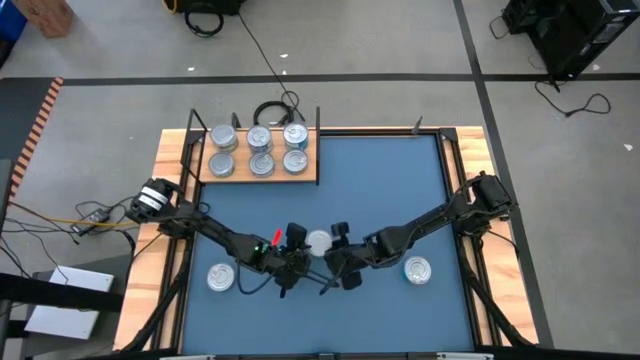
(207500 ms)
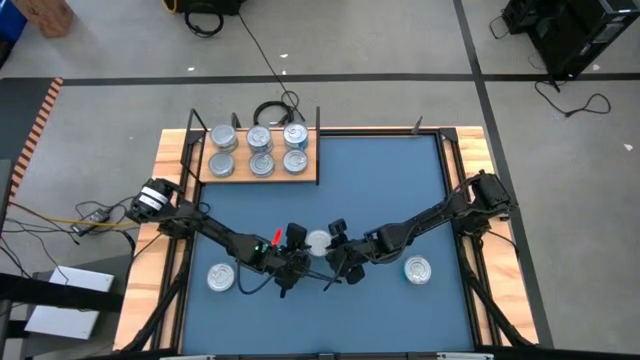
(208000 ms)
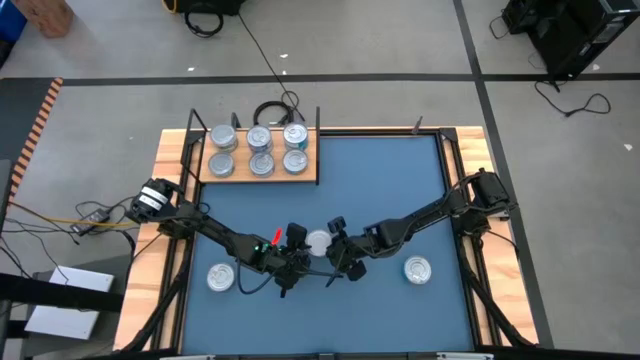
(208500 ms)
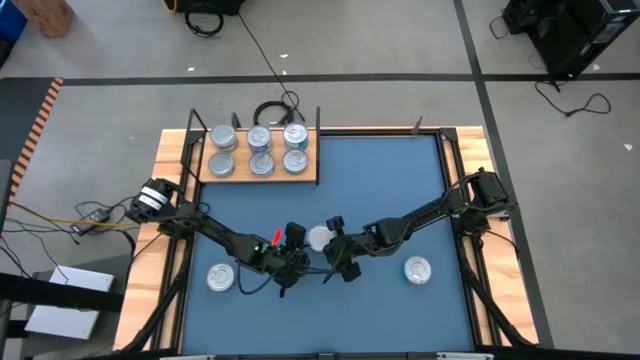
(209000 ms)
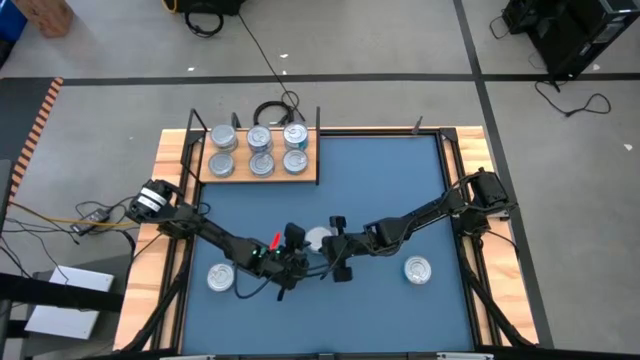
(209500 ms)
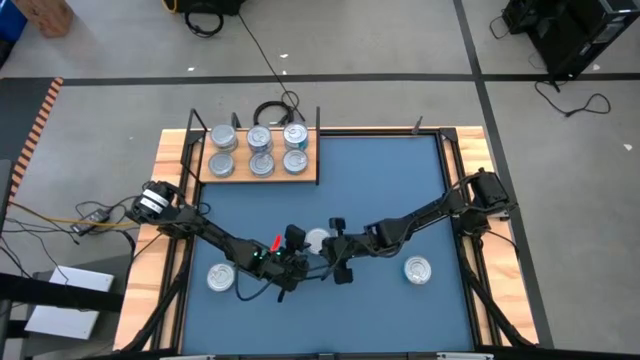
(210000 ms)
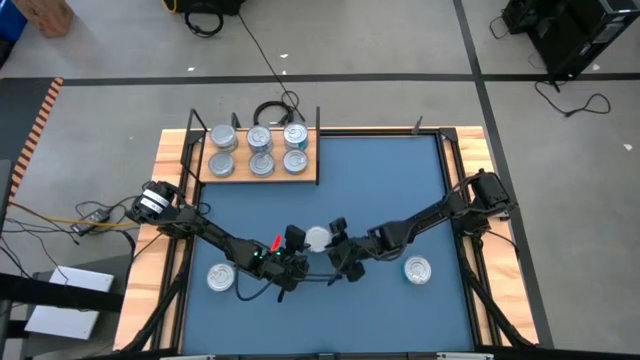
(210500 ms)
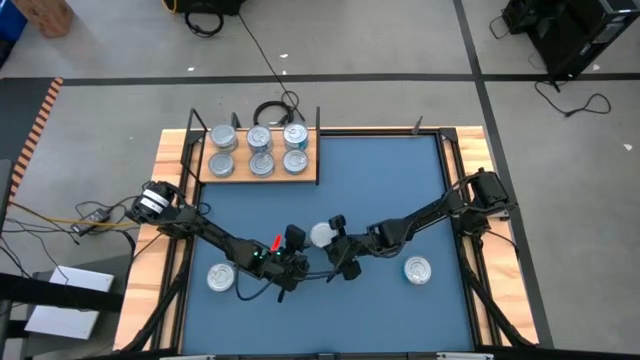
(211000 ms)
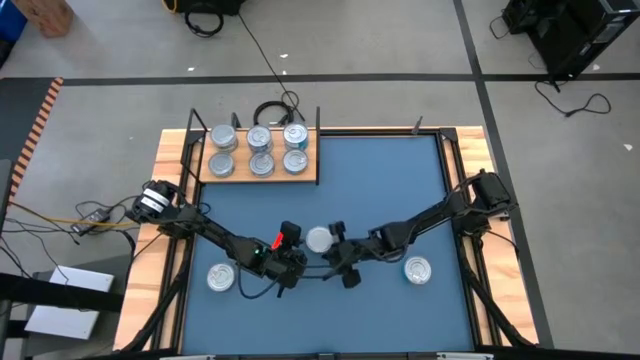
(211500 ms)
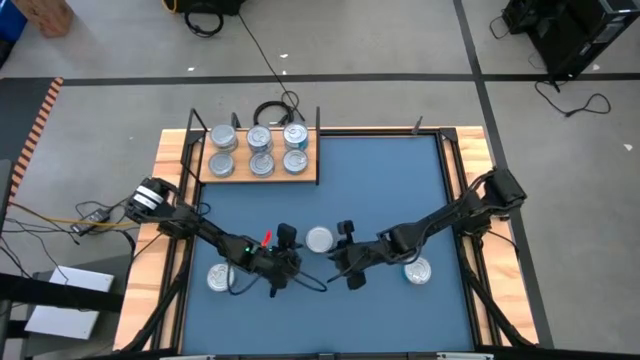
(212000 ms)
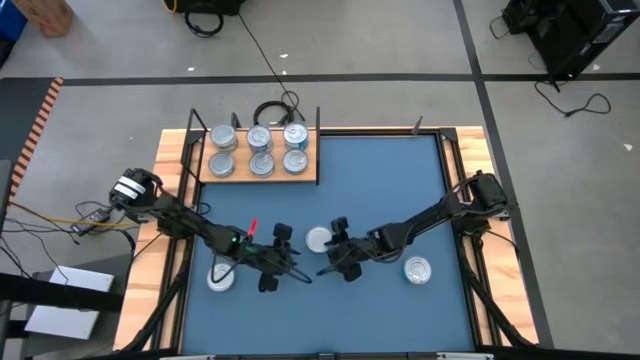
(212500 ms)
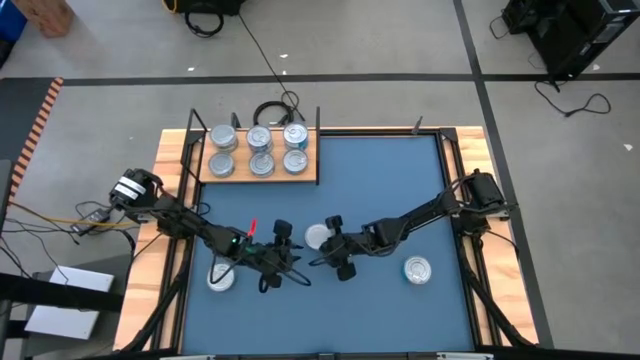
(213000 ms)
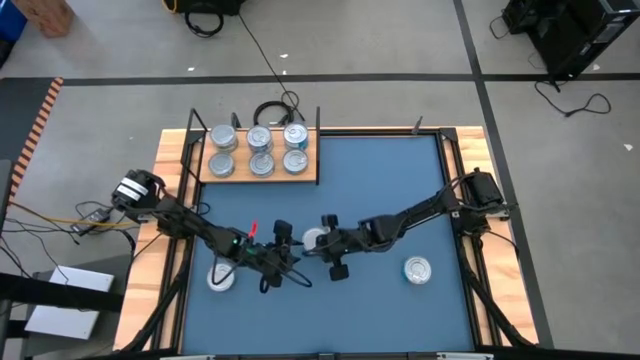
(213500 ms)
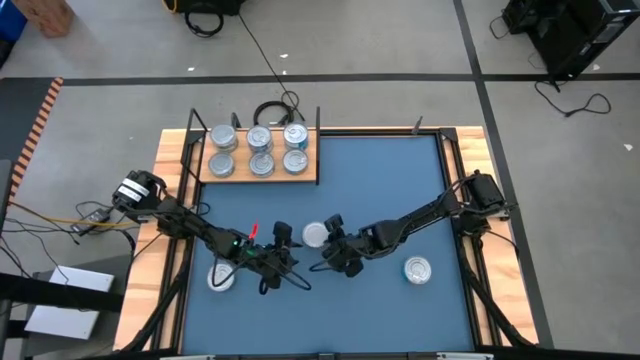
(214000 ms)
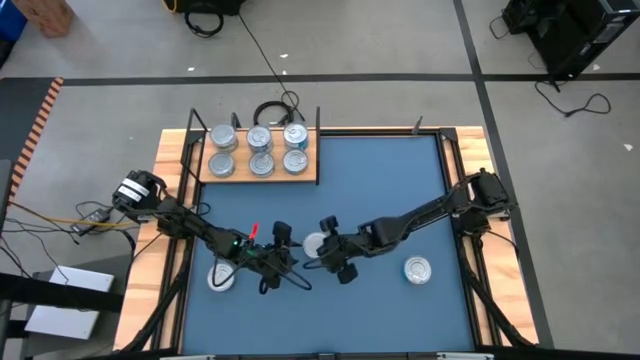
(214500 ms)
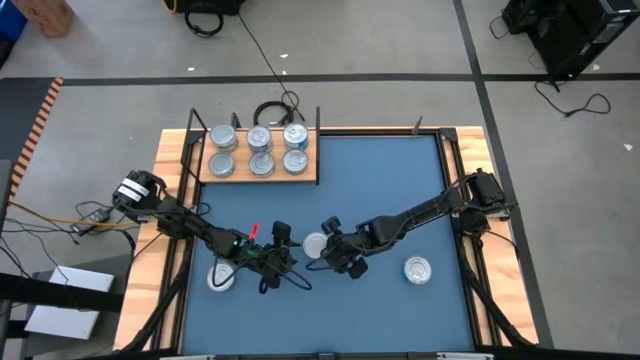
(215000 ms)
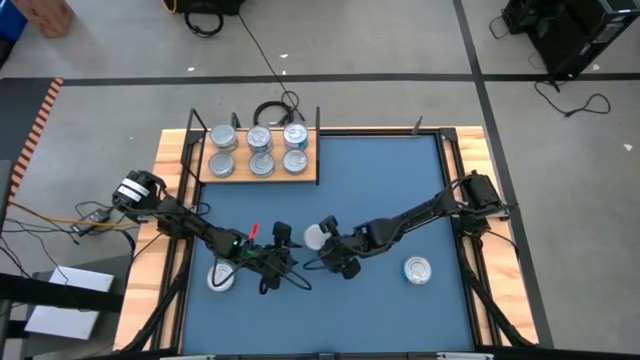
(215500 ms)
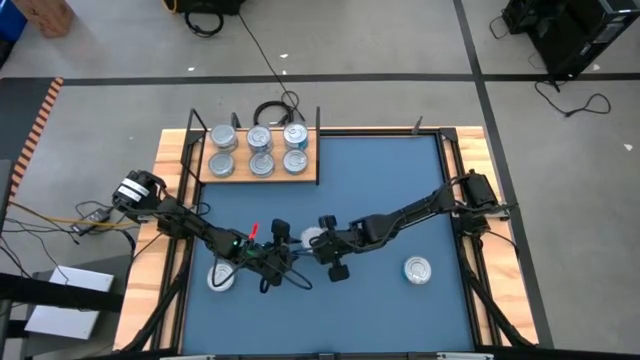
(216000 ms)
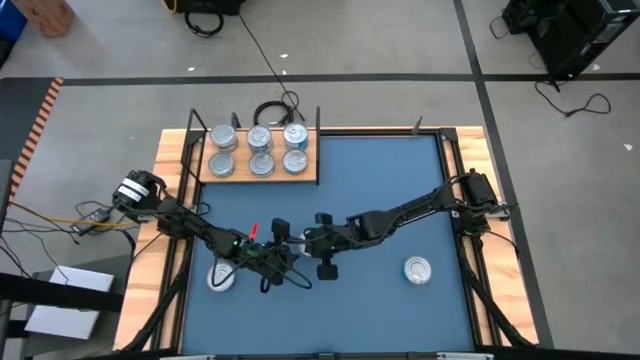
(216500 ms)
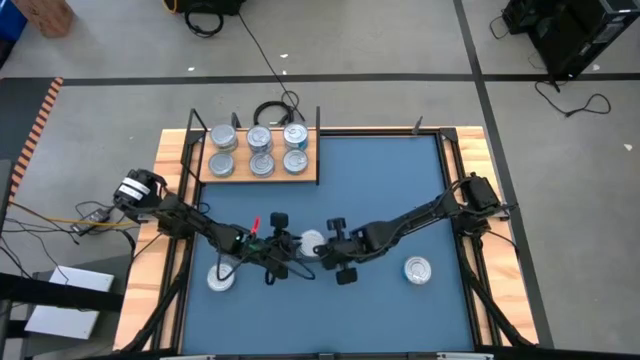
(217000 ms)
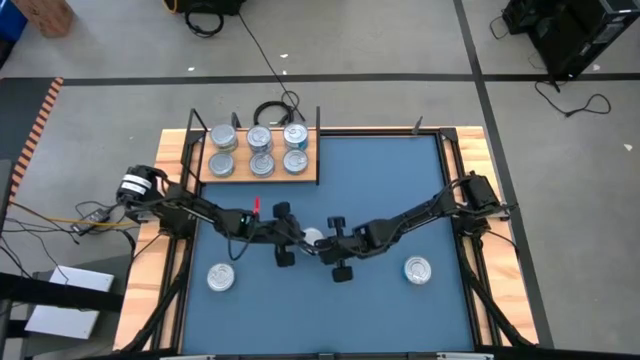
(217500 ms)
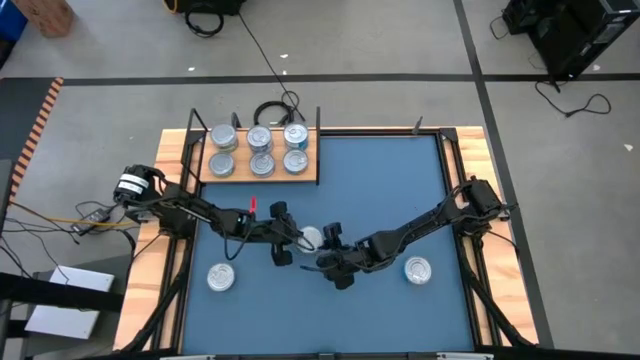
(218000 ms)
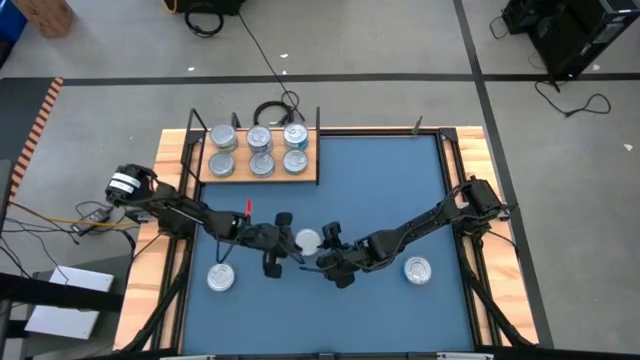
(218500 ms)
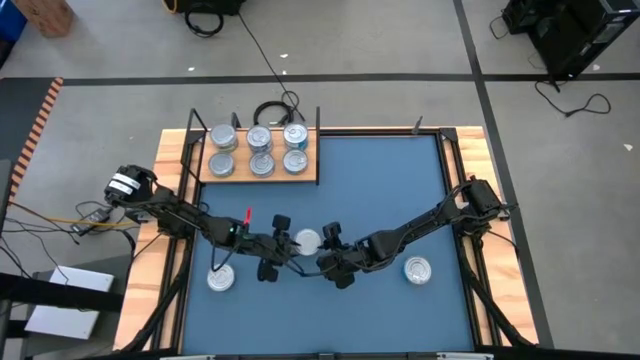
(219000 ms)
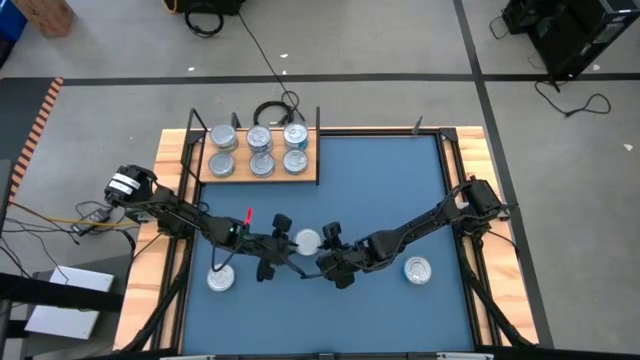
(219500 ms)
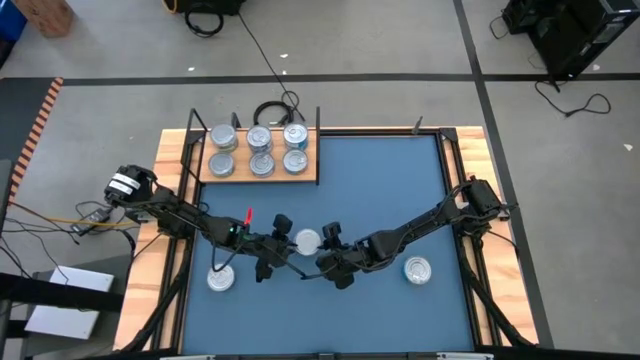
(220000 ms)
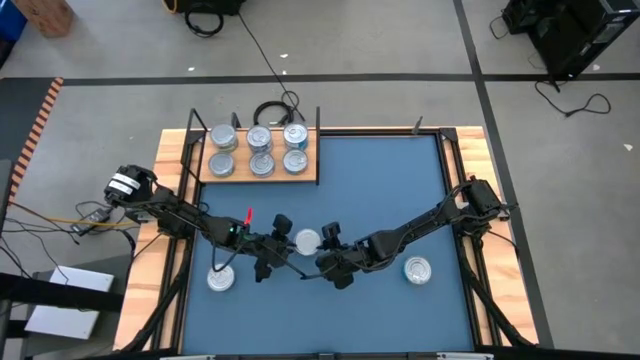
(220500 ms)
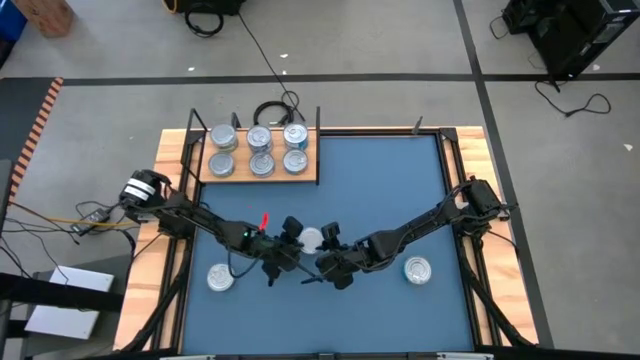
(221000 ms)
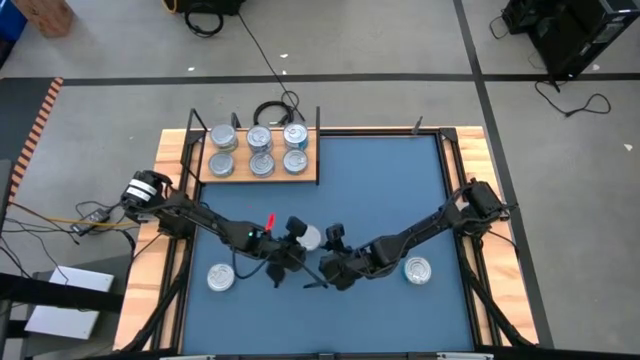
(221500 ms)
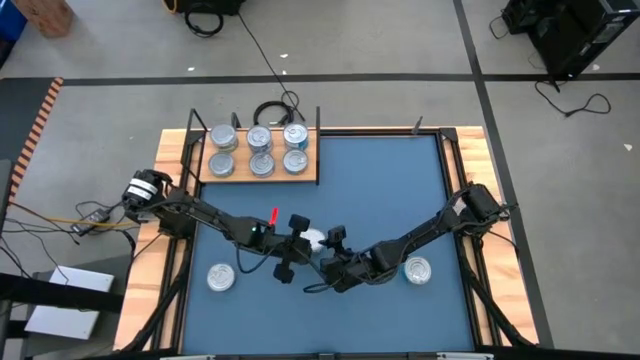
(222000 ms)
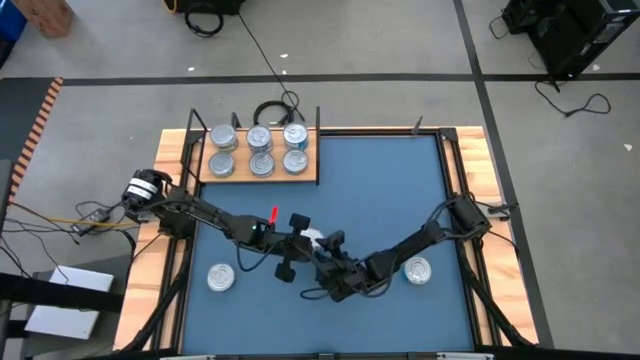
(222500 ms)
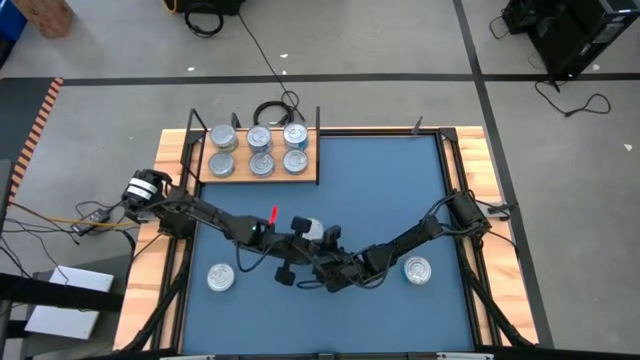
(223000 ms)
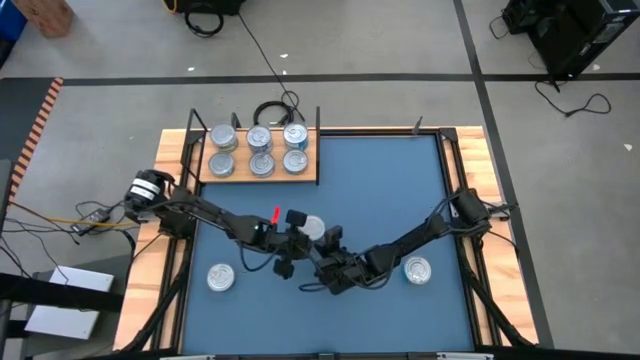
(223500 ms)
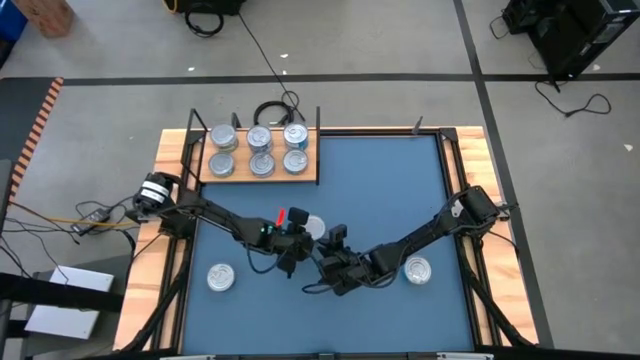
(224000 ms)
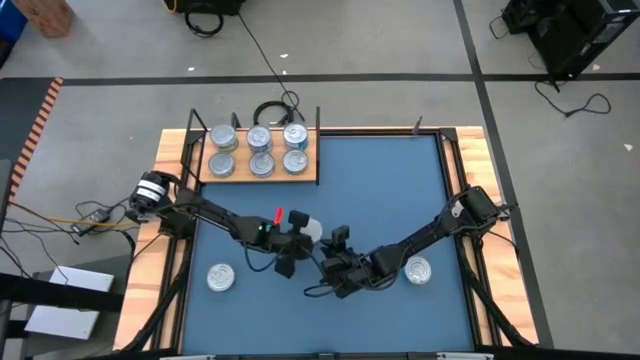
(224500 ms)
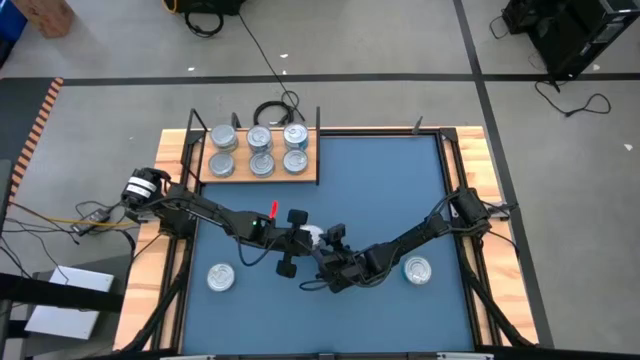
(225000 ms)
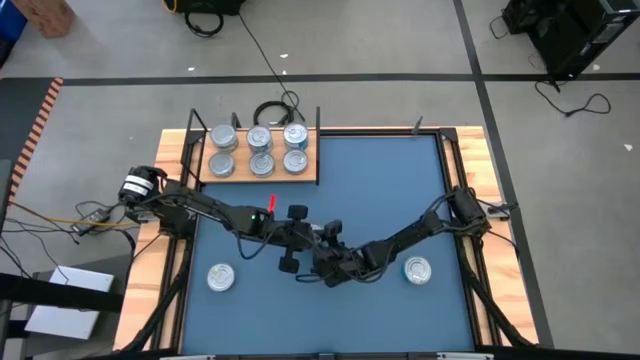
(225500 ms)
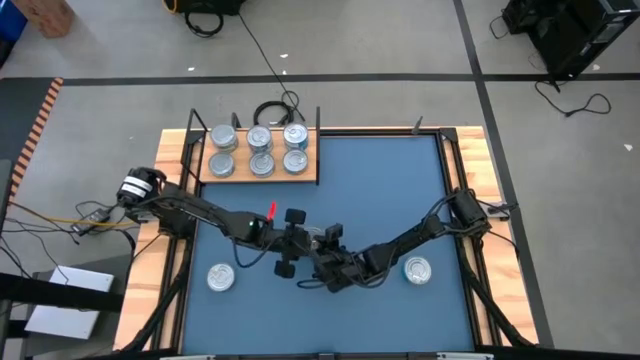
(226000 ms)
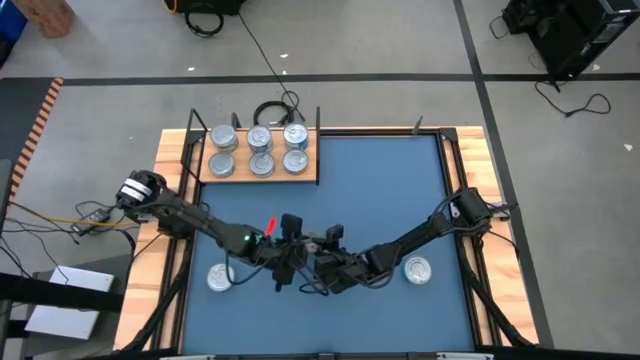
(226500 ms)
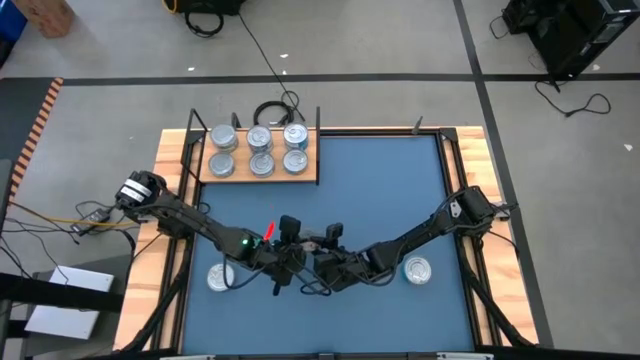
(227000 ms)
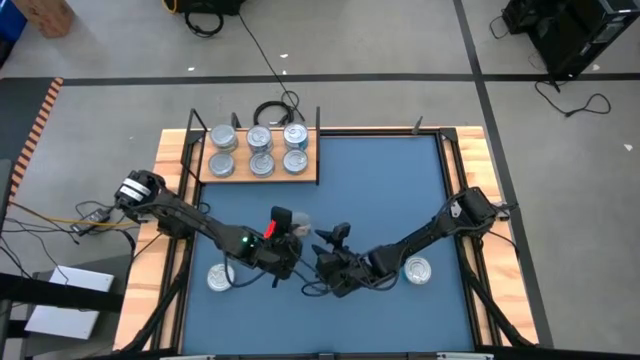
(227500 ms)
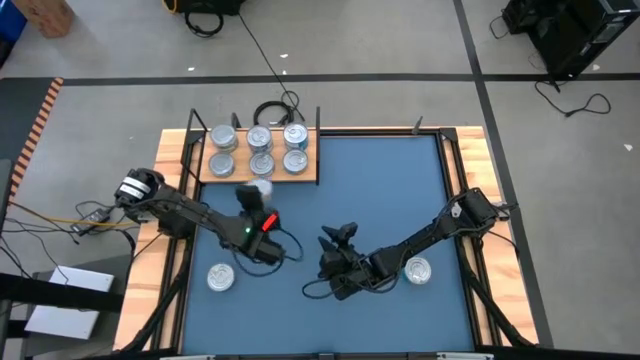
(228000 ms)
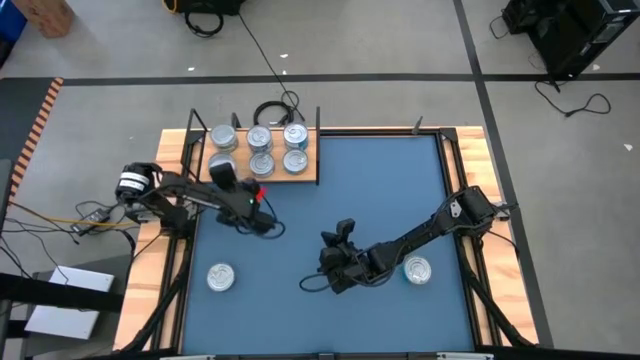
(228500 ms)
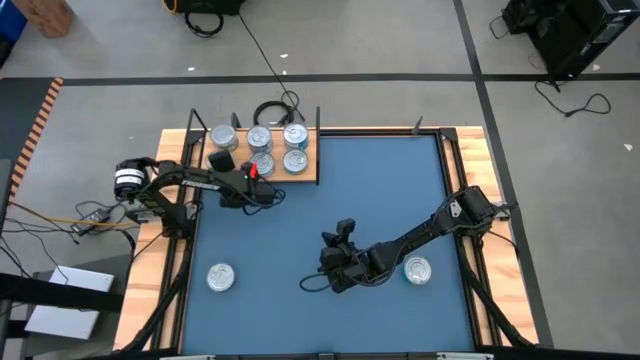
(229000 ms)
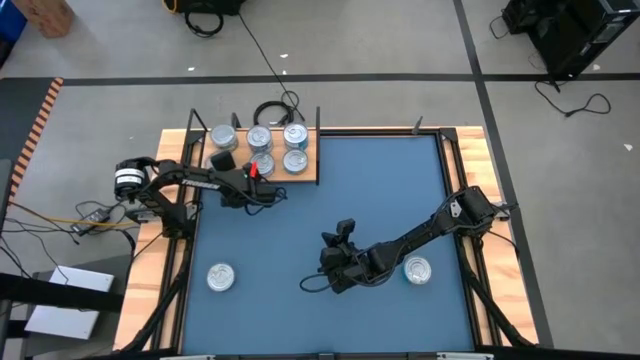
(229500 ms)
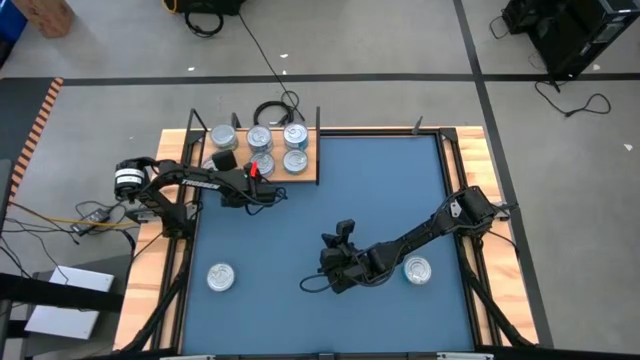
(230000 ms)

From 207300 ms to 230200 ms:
Task: Stack canned seafood by type on shelf
Stack the green tuna can on top of the green tuna can on the shelf
